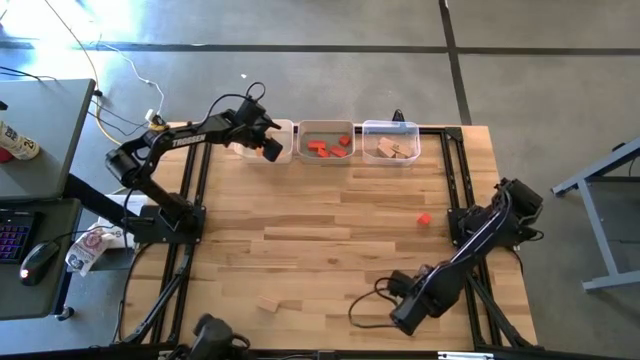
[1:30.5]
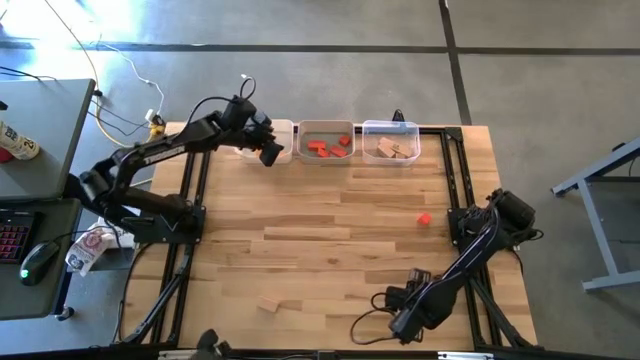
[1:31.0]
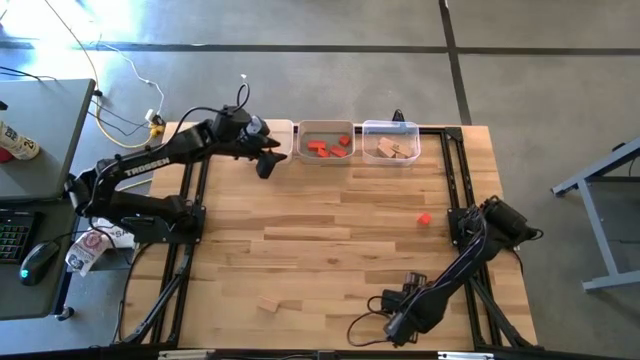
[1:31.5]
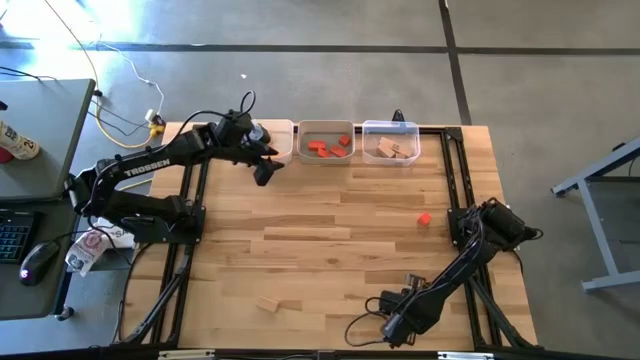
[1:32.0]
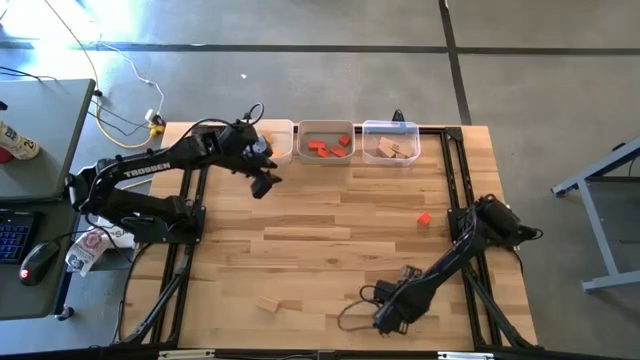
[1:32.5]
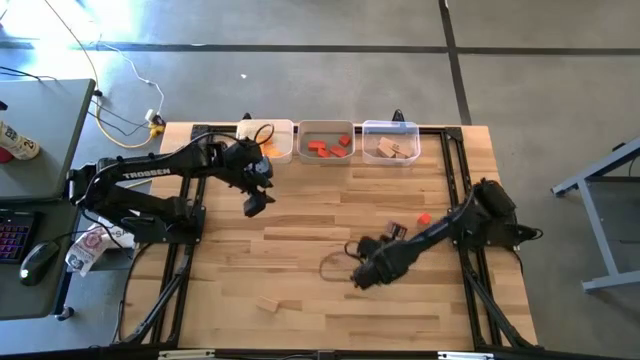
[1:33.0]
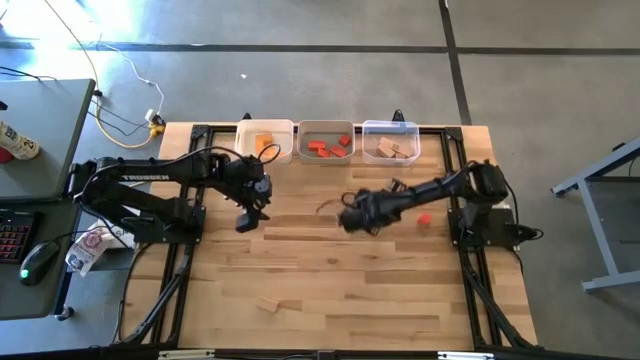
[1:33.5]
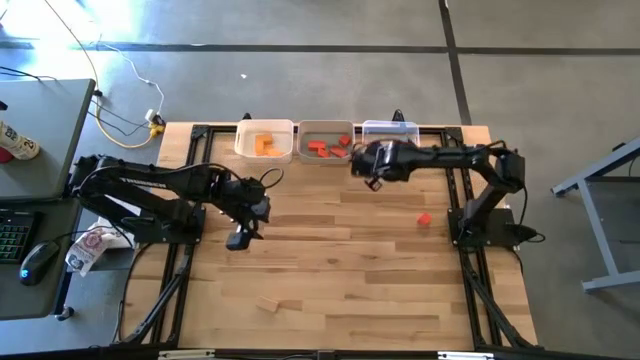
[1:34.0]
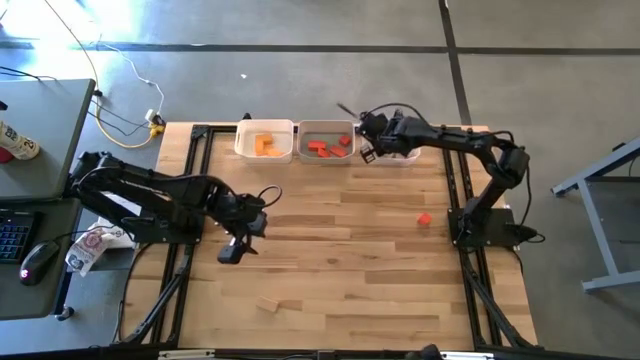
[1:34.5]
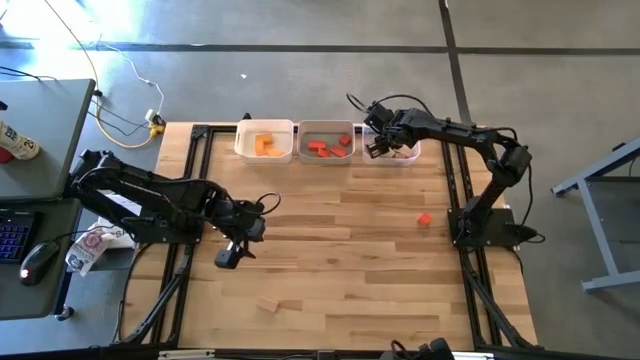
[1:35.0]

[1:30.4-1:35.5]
Task: Sort & place blocks by color
Put the brown block into the transparent bin

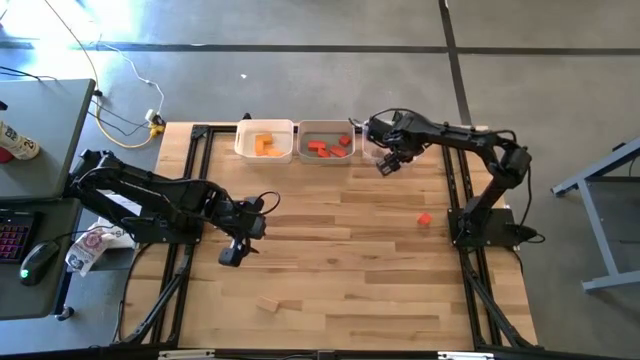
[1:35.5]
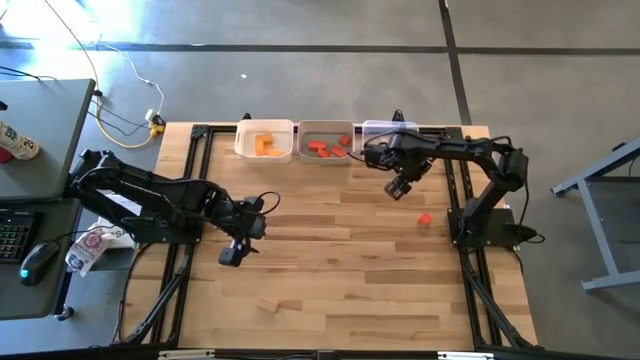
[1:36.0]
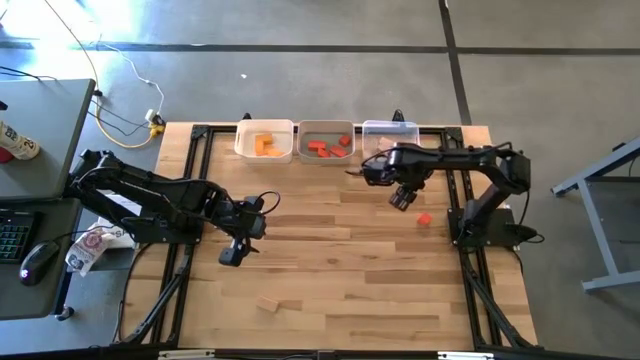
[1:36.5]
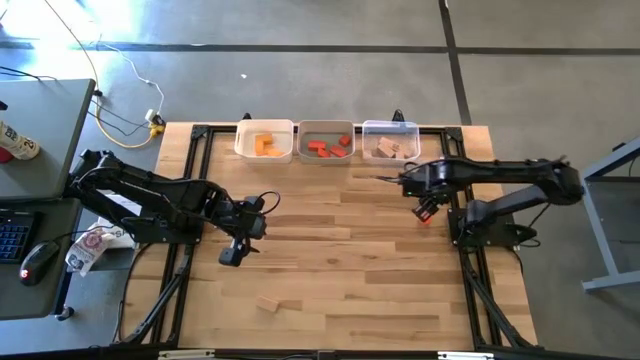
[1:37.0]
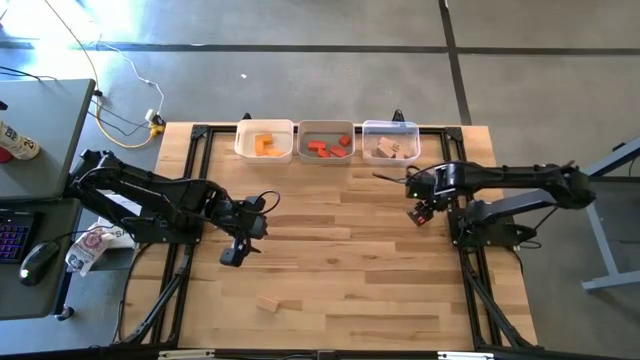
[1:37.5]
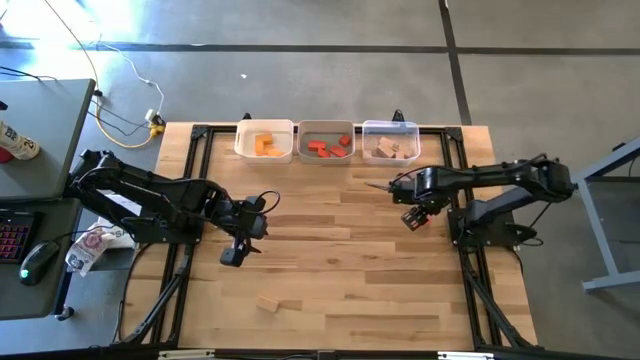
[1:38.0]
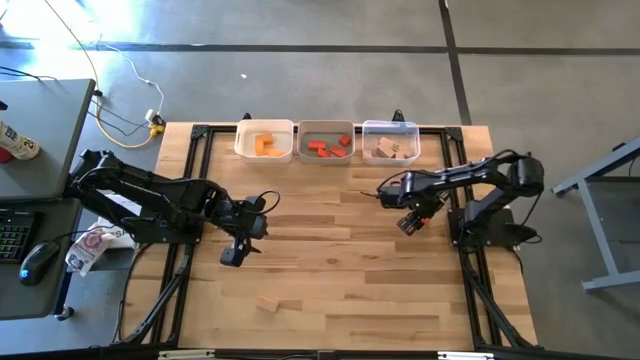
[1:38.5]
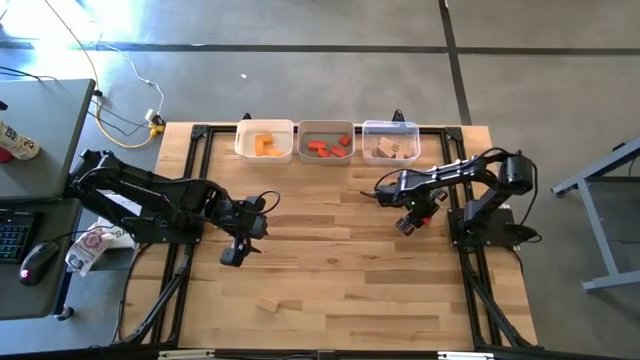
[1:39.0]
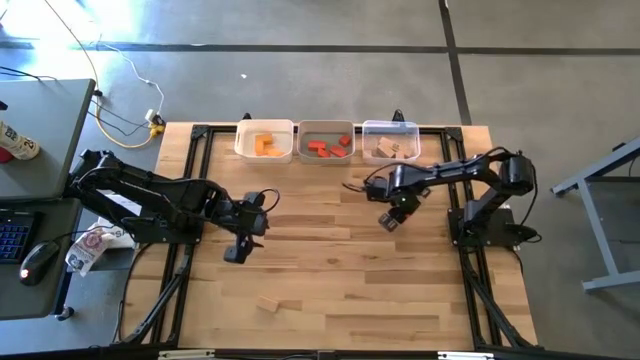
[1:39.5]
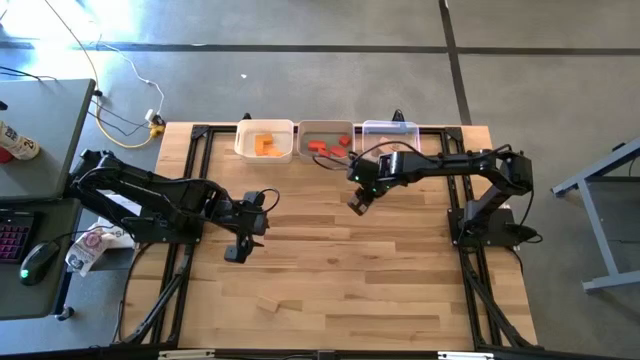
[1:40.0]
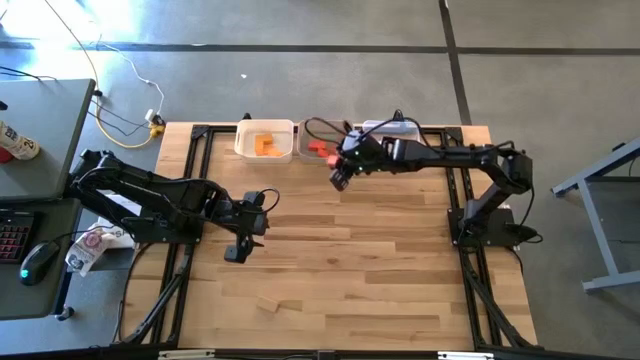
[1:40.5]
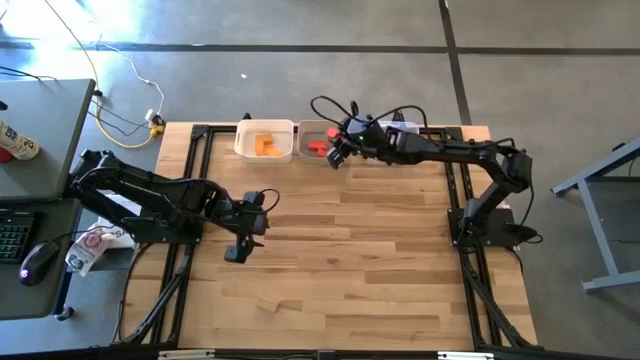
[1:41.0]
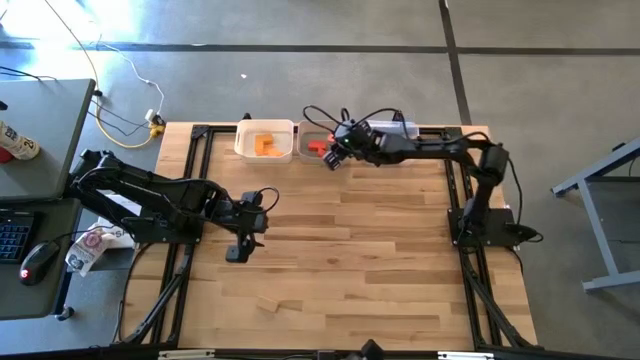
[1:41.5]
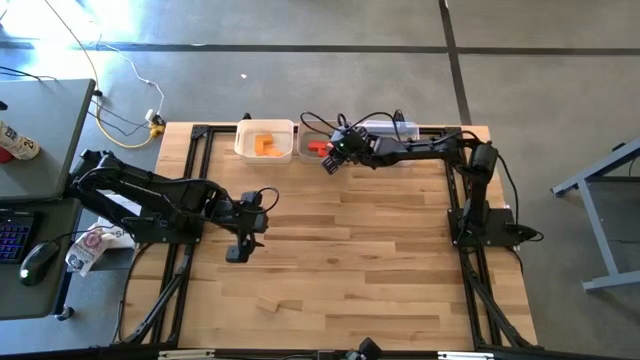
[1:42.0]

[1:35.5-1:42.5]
Put the orange block into the gray bin

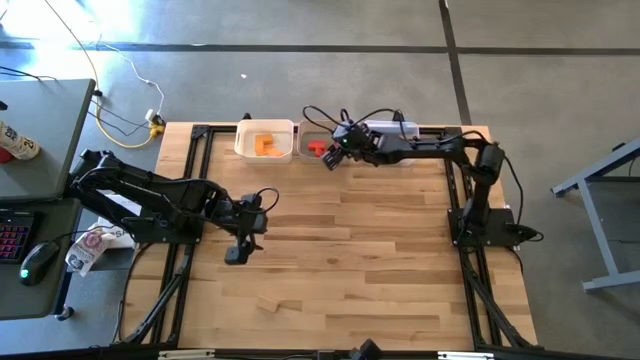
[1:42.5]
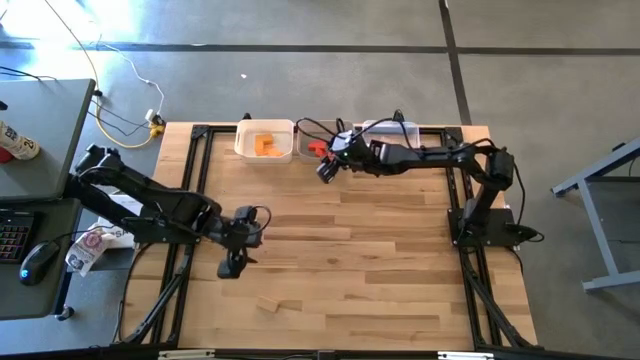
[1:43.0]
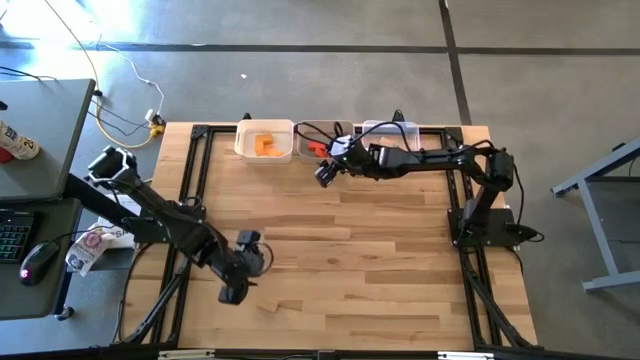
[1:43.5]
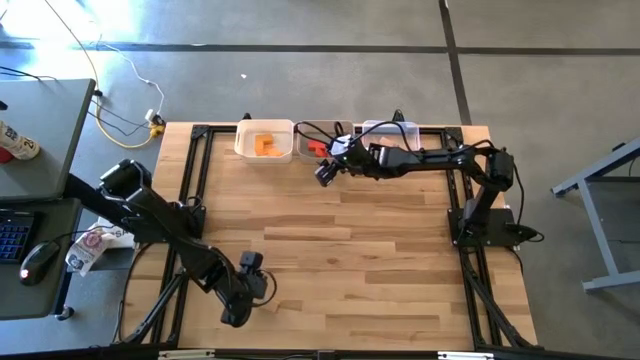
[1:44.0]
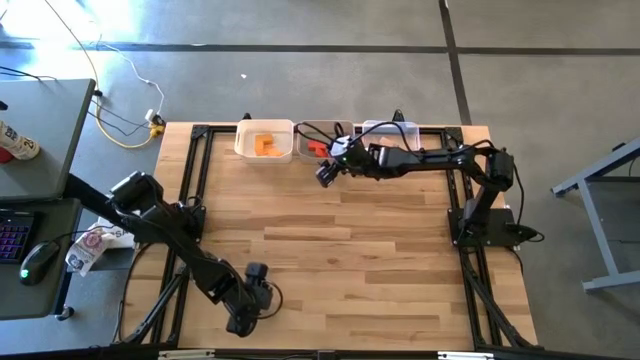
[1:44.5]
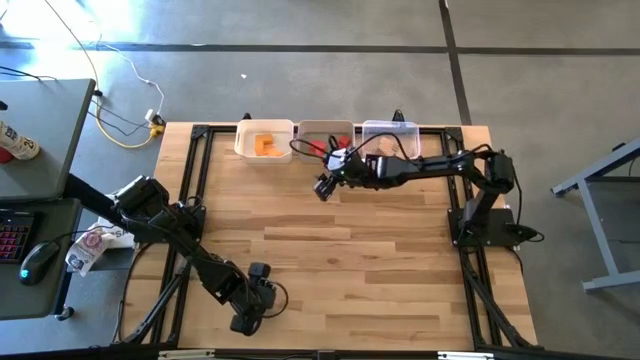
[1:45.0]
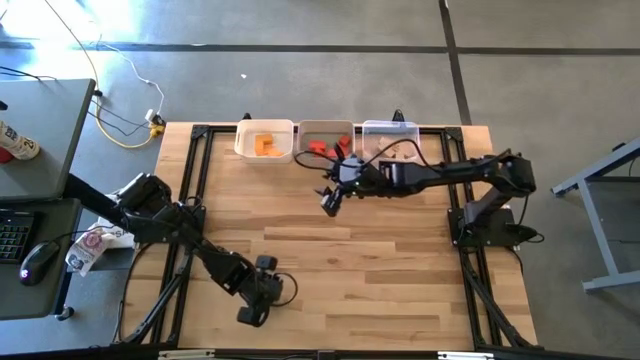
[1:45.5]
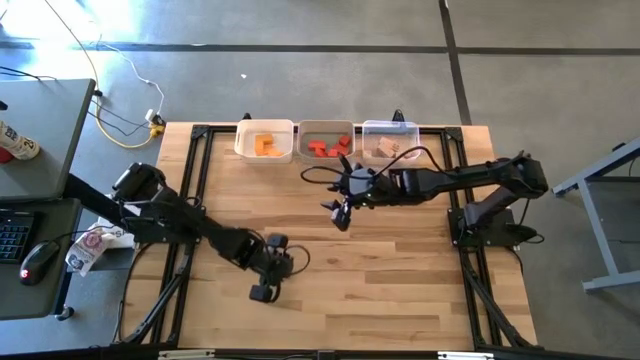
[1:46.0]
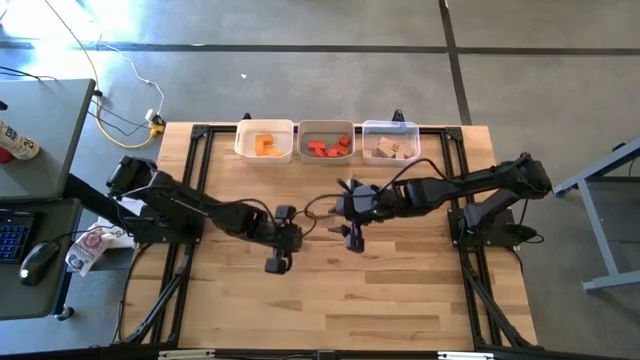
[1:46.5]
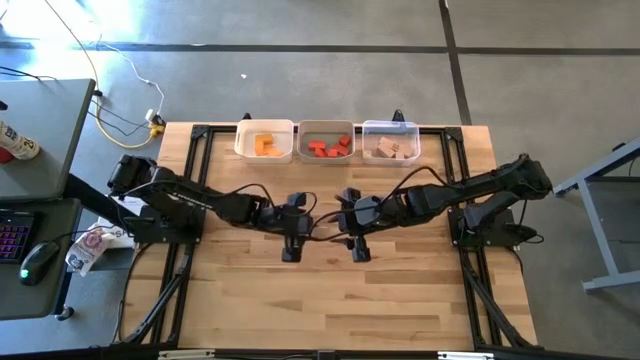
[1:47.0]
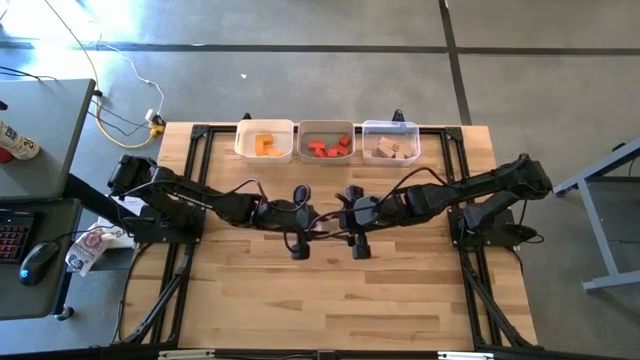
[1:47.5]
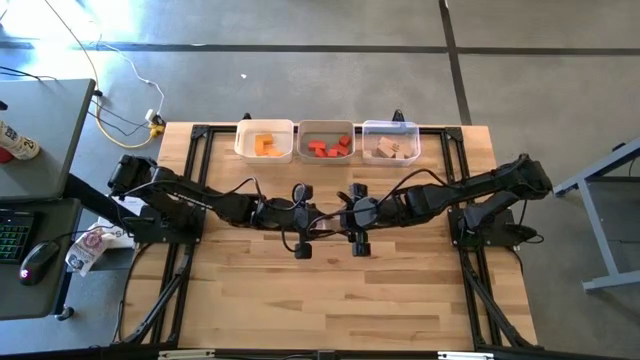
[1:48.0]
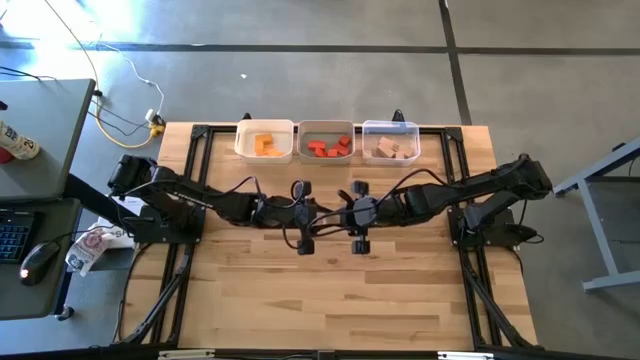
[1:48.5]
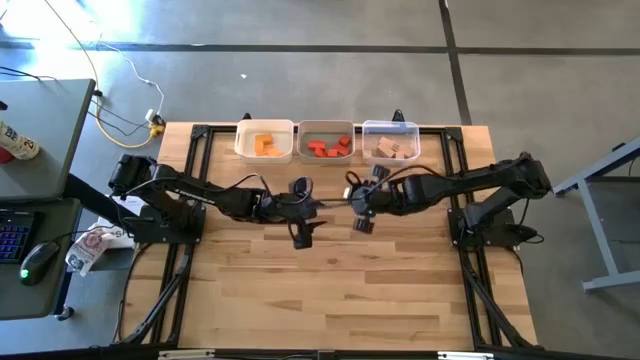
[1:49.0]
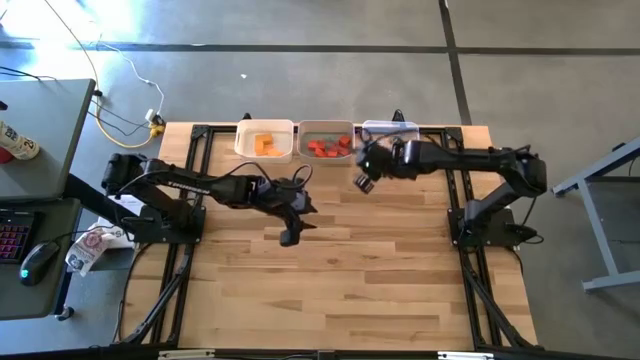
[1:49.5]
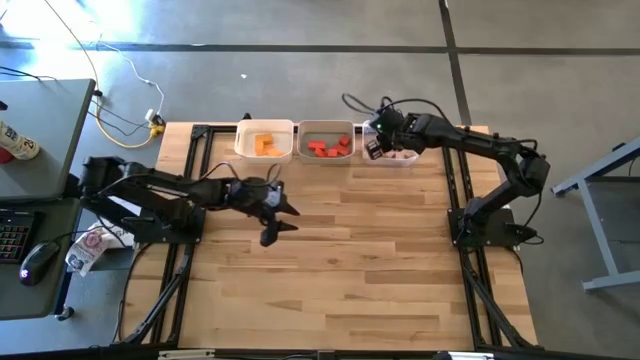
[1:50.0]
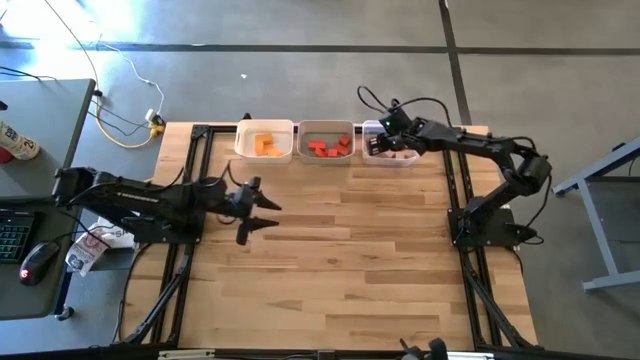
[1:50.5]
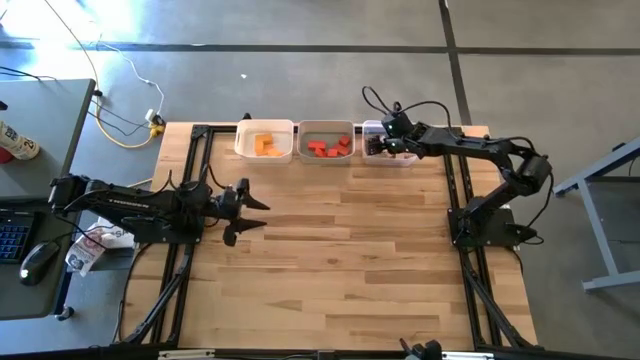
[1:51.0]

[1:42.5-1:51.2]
Put the brown block into the transparent bin
